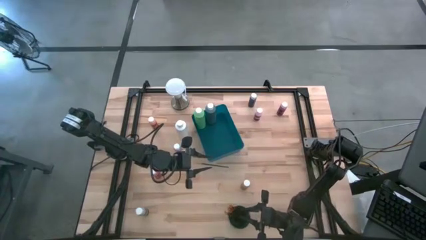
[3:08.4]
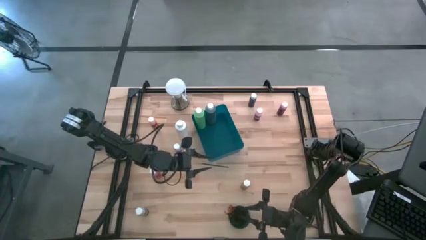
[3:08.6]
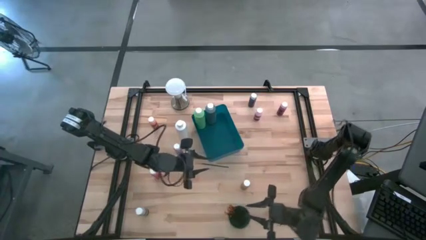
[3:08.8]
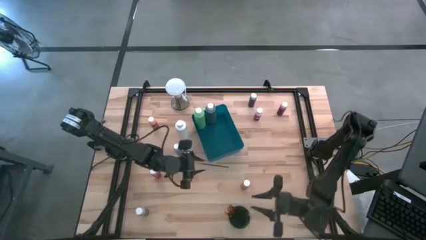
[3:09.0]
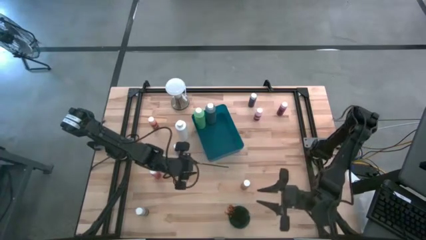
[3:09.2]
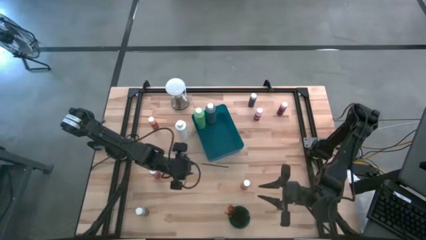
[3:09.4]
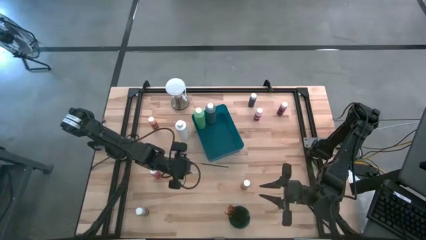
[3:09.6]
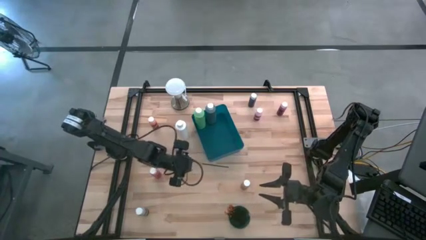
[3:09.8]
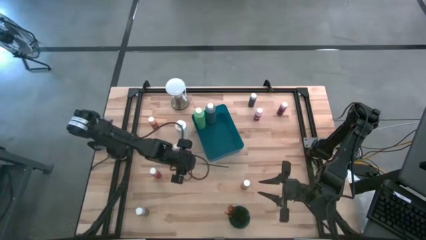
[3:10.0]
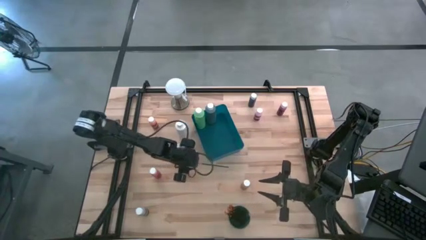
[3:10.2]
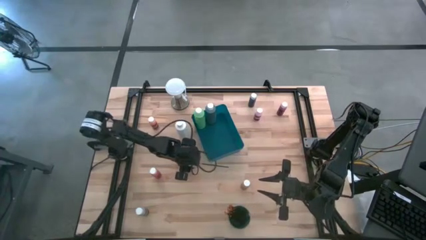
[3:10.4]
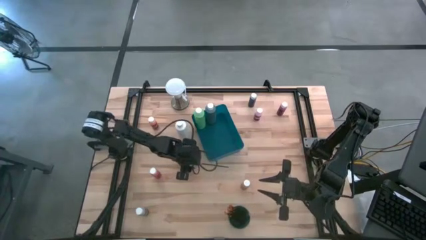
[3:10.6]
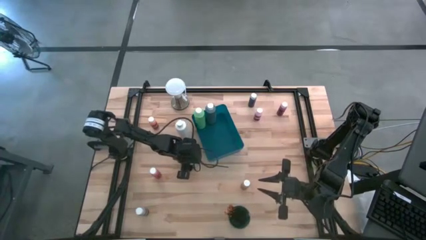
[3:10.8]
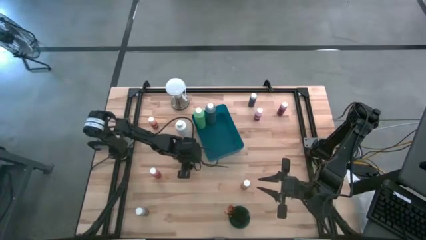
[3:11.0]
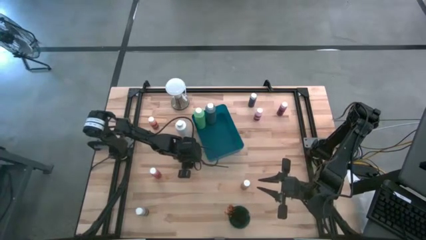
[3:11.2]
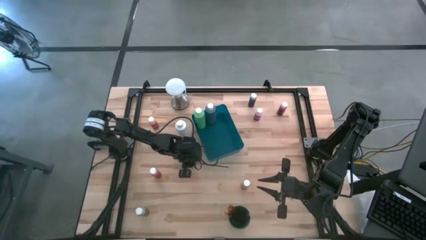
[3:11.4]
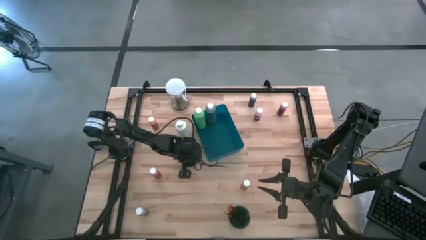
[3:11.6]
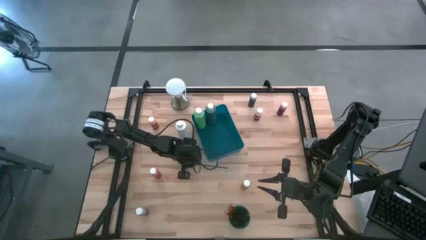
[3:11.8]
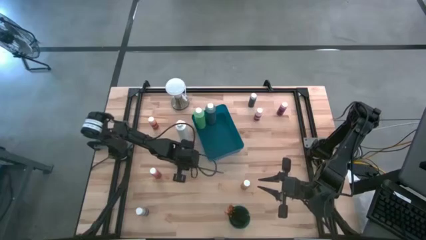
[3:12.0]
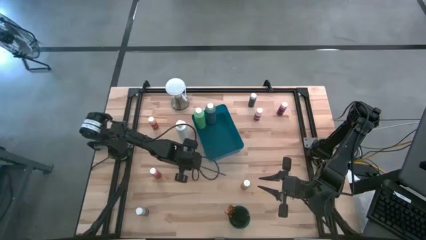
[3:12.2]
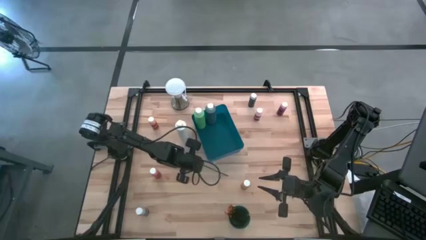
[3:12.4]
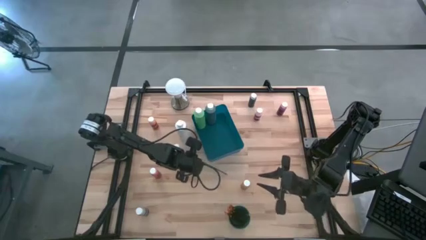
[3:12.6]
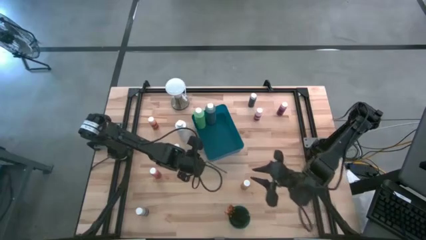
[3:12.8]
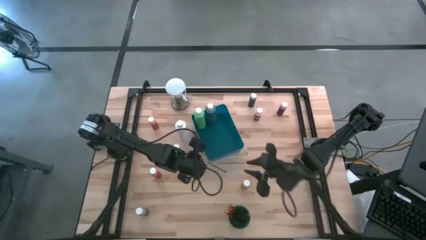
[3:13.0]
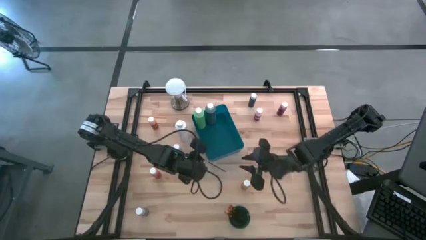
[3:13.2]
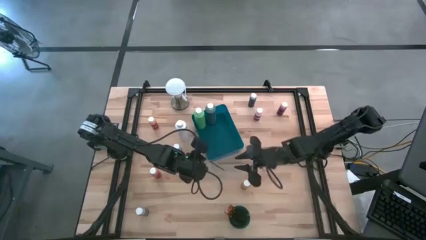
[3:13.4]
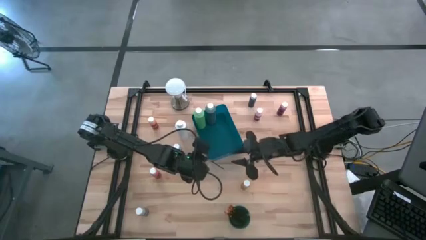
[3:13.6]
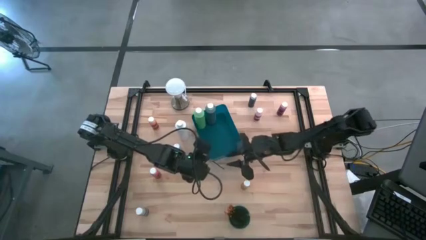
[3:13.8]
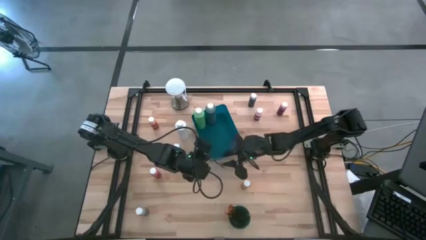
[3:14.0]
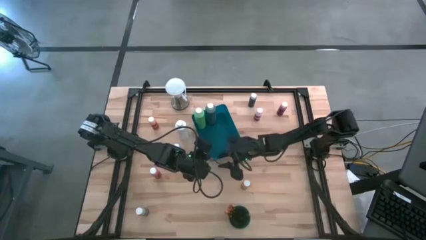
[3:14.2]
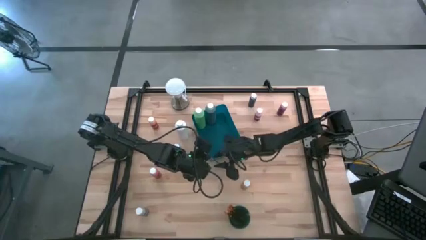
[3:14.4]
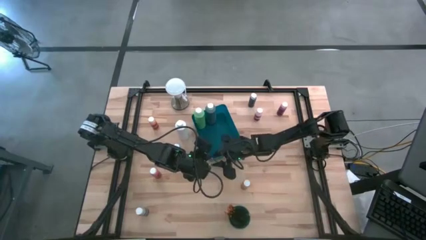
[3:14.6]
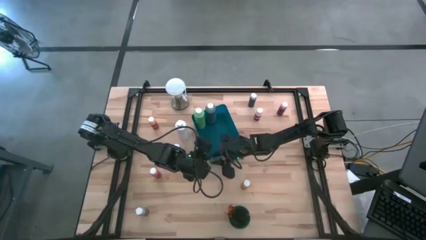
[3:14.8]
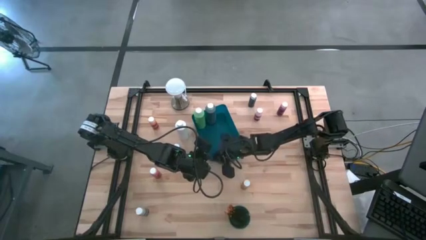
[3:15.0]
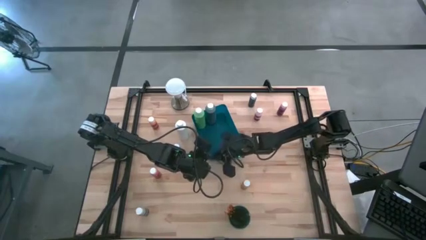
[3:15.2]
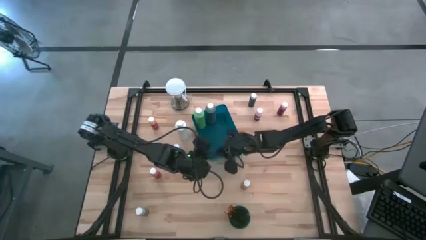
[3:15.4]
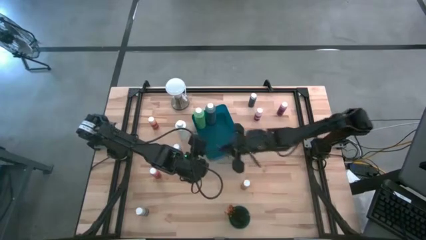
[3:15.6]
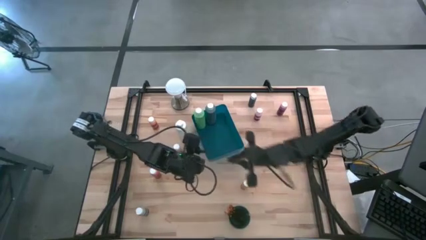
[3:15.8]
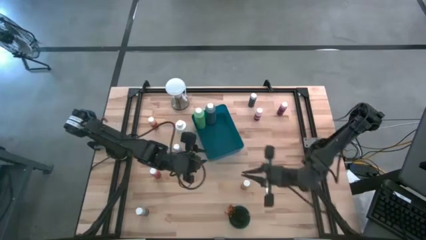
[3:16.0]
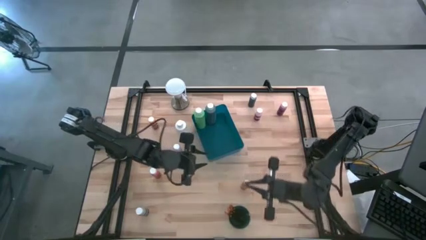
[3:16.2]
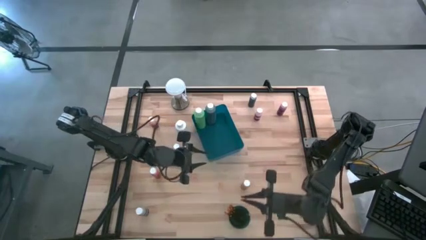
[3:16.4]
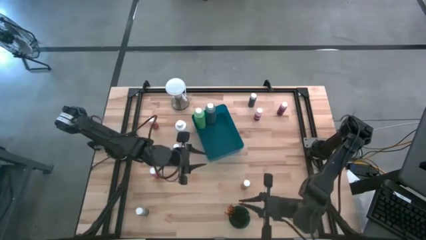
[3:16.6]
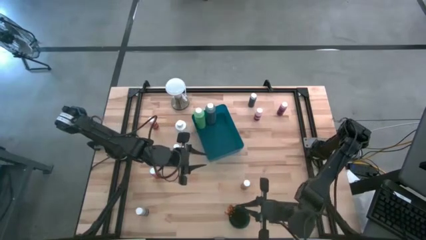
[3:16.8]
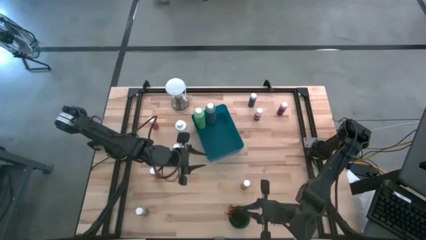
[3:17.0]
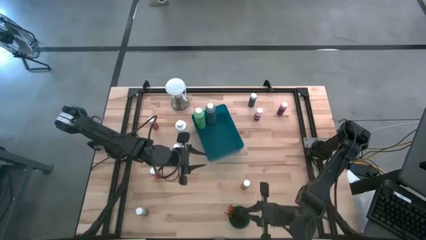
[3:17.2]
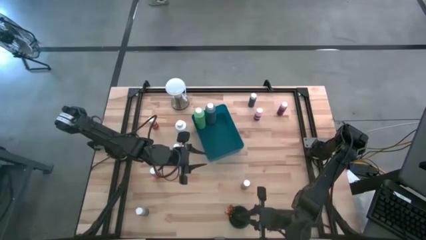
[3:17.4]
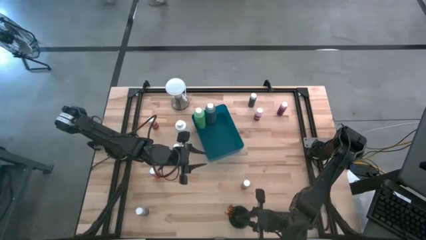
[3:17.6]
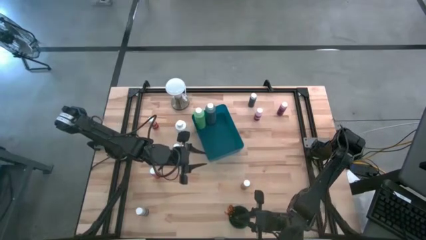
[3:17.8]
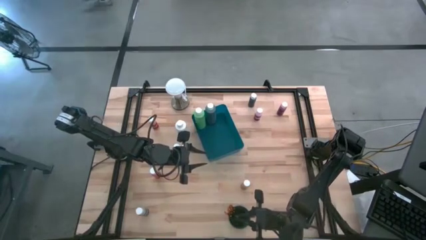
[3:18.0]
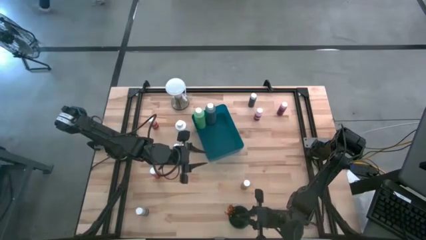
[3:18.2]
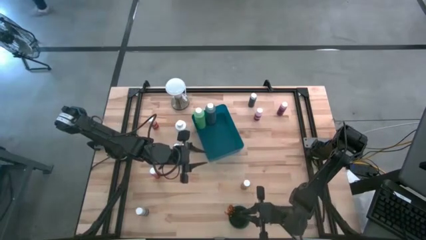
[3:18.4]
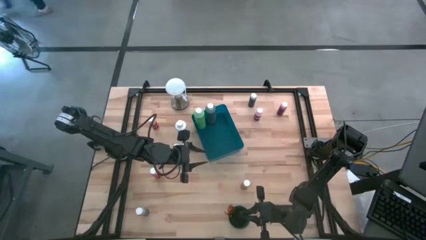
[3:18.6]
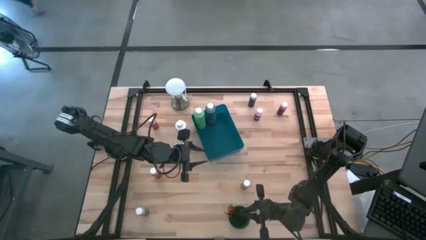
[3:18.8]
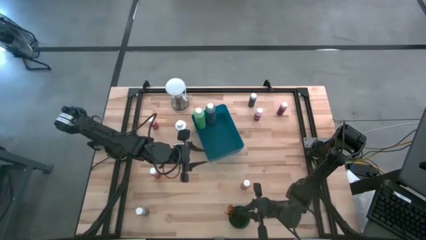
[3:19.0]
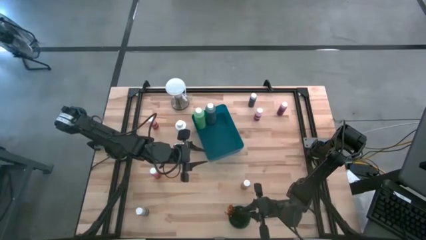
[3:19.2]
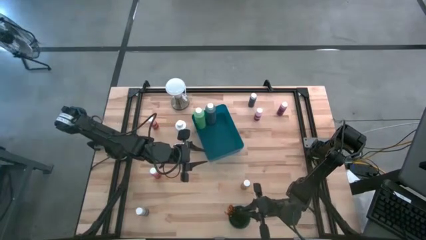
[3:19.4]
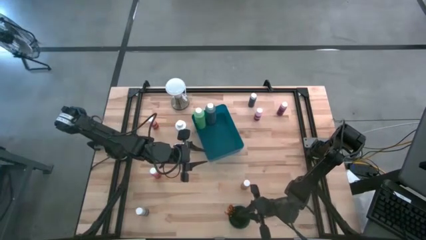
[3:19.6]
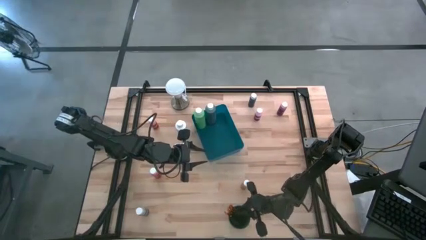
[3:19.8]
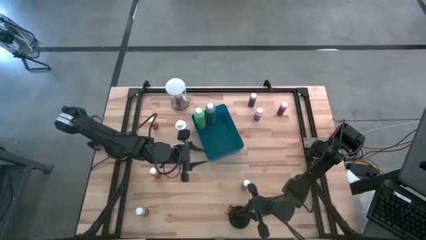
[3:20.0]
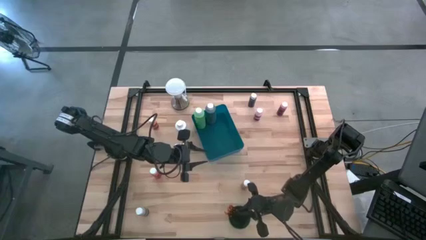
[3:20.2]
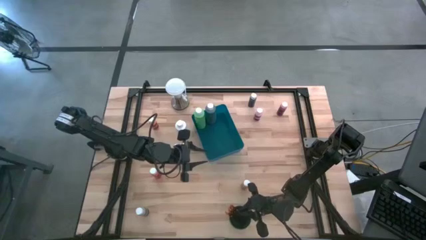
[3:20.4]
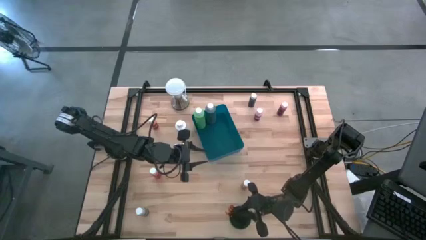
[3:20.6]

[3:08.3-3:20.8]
Task: Pick & Place Paint Supplies
Put the gold paint brush into the green cup
